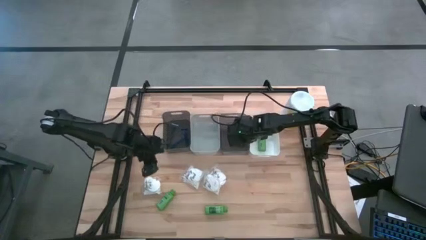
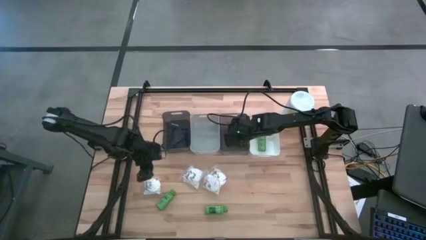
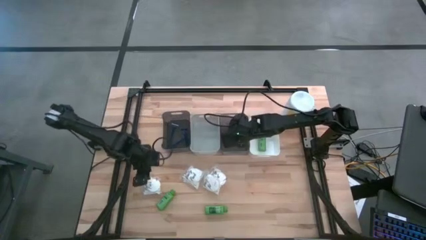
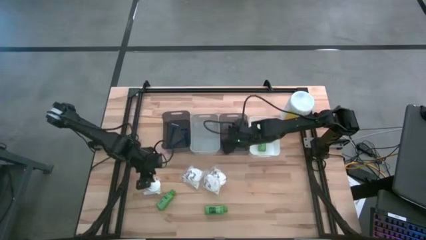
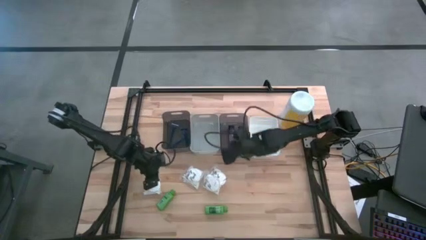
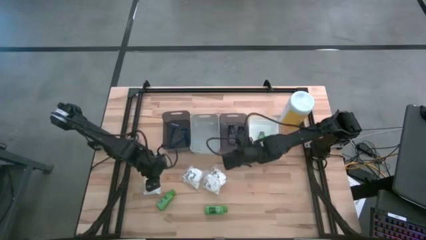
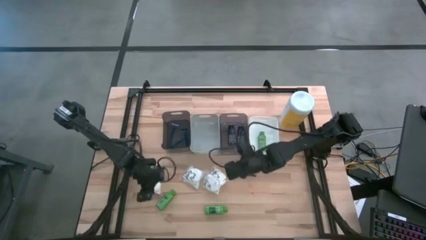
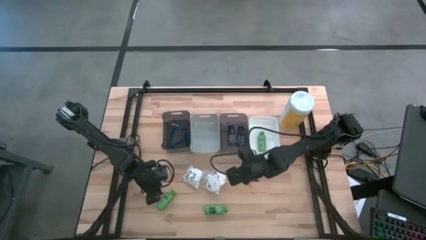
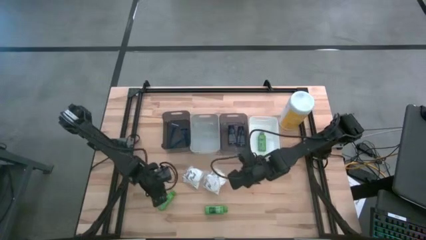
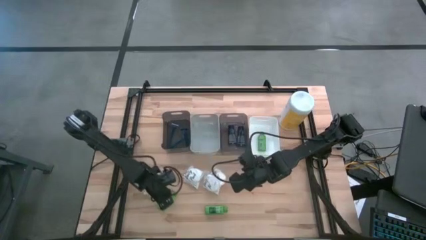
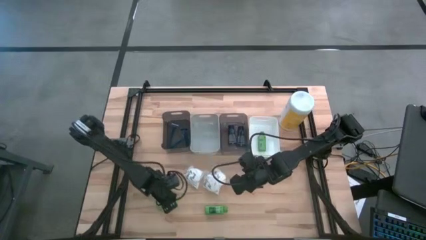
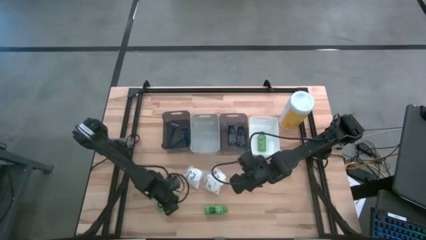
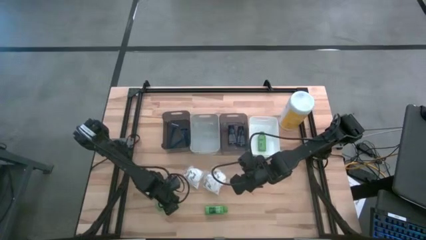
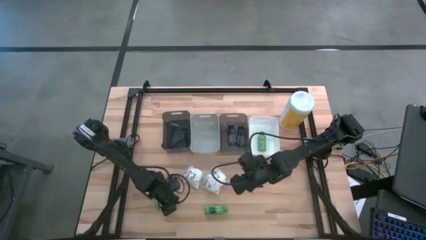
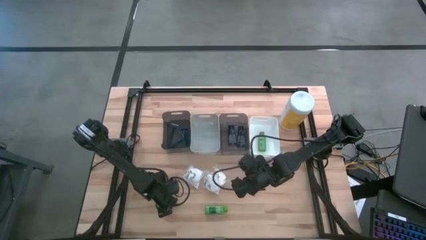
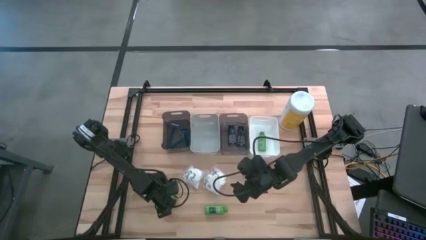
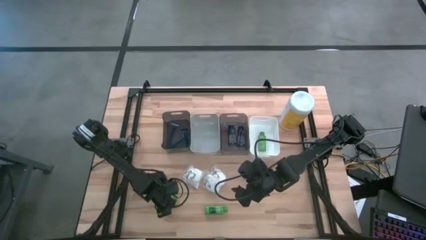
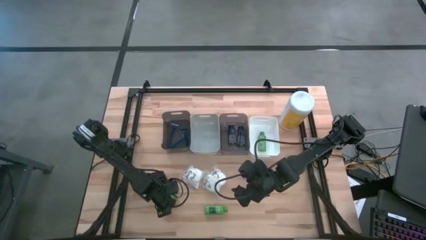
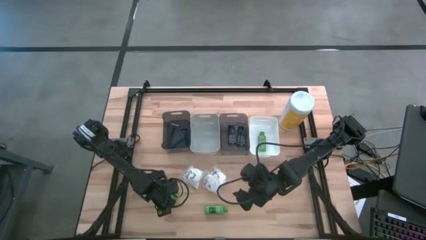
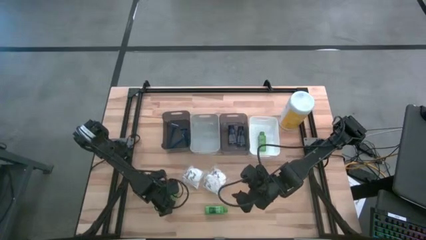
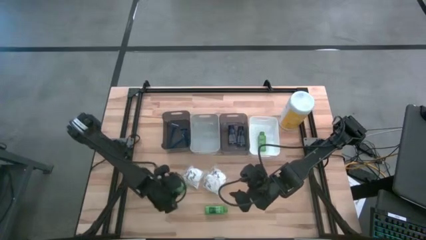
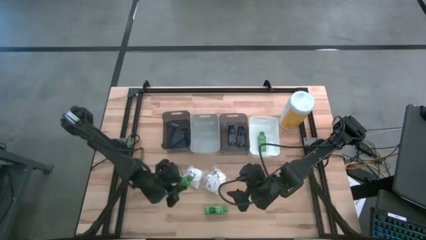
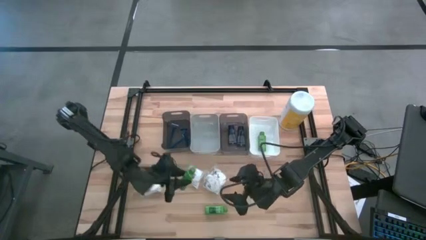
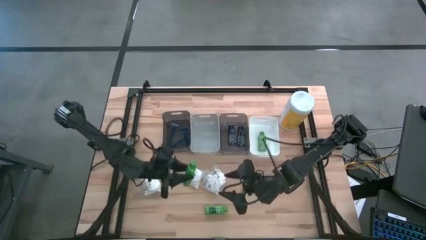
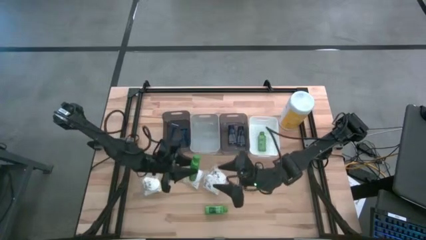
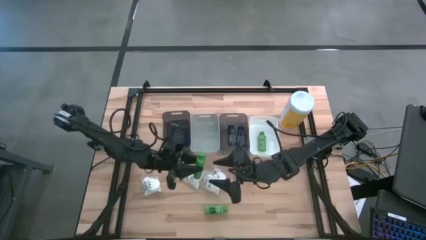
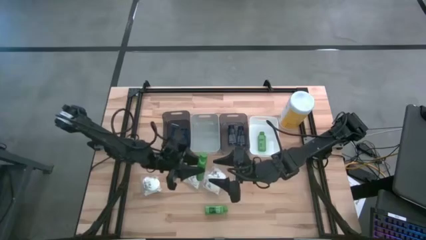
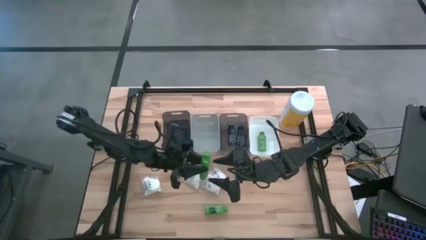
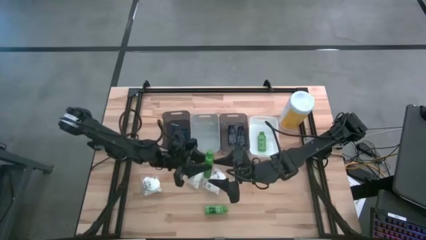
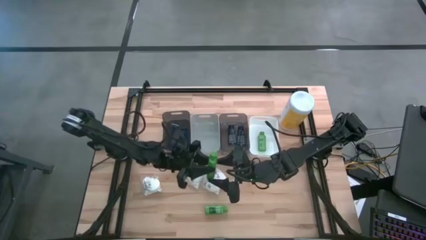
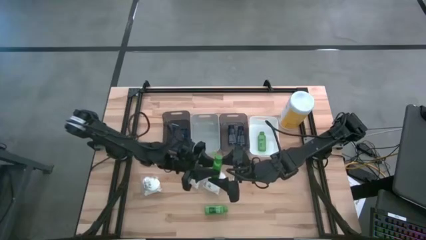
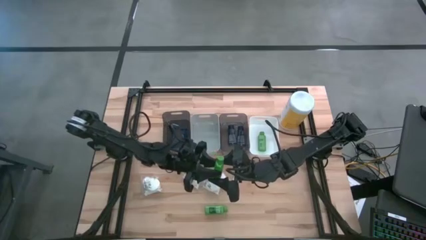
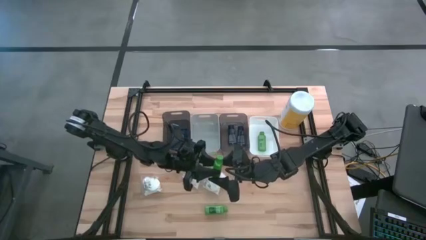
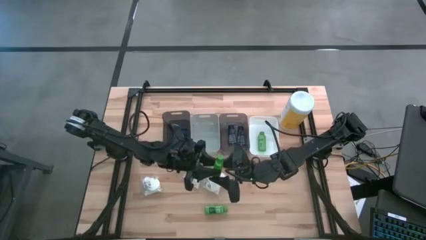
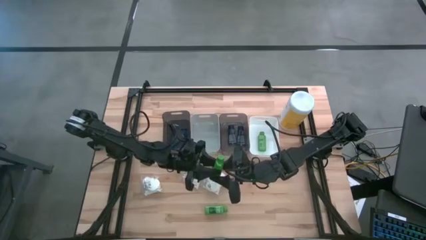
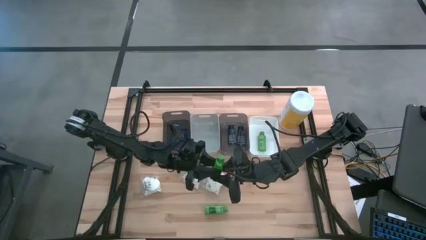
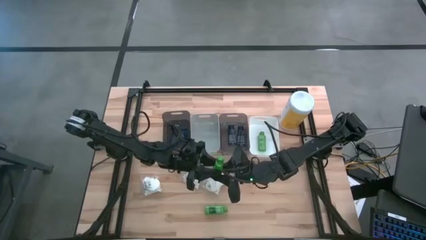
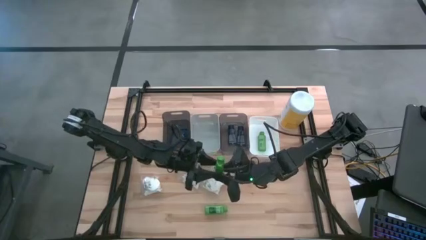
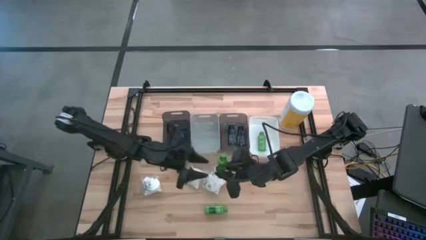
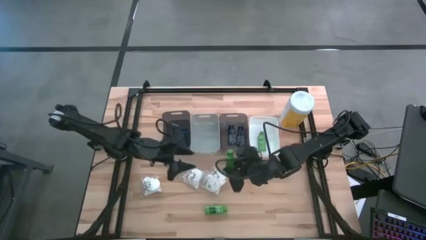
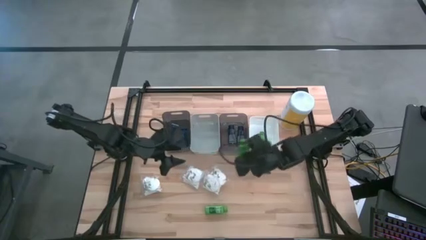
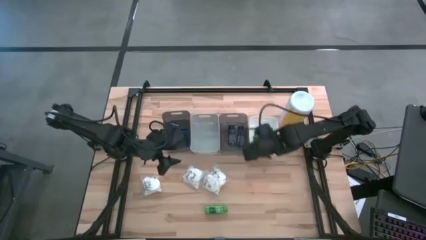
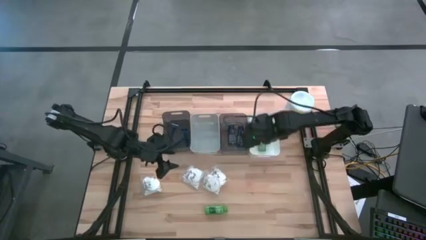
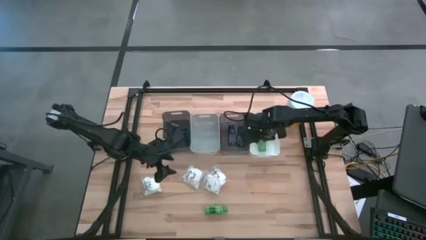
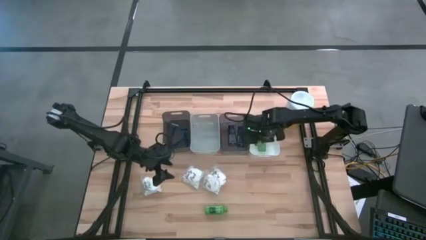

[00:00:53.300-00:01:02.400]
Task: Pick & Place Travel size toiletries
Put the green shampoo into the white bin

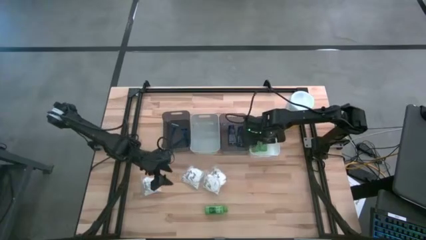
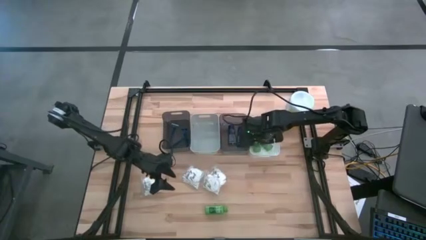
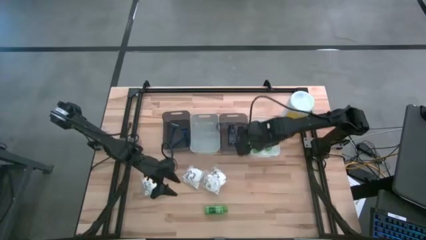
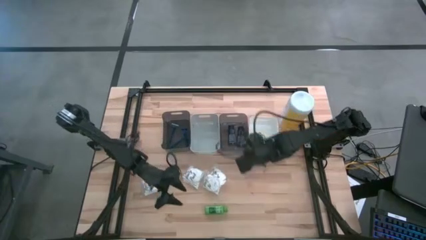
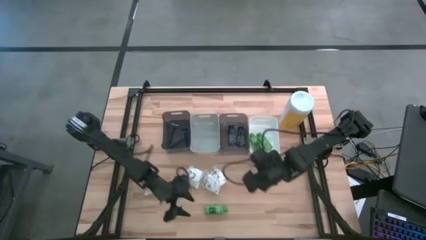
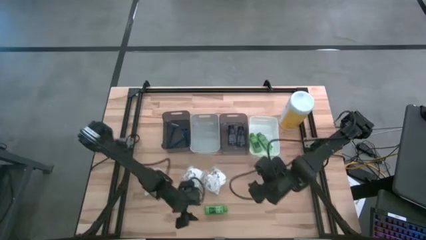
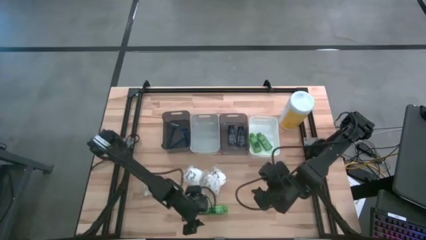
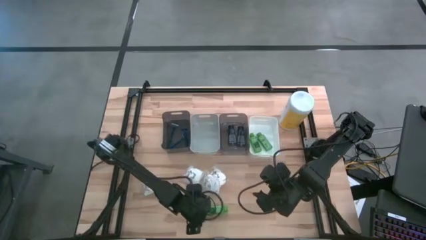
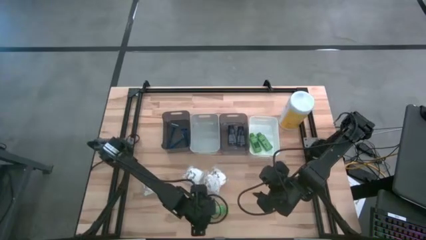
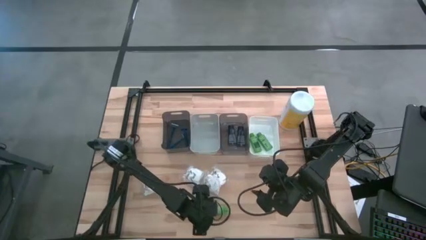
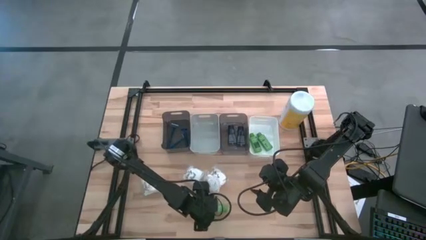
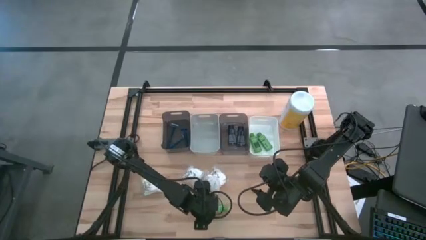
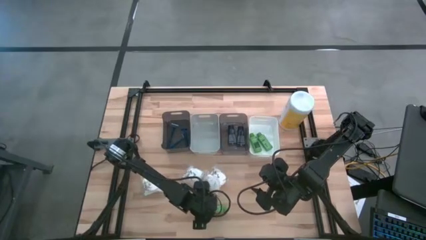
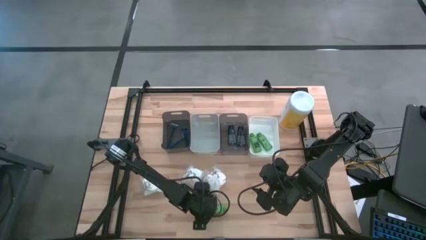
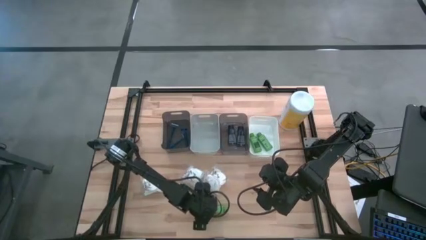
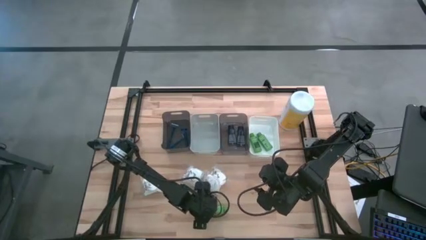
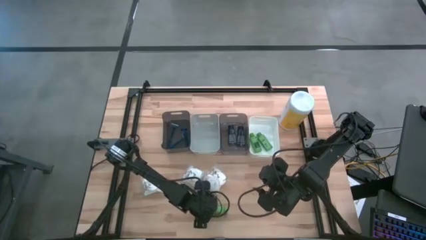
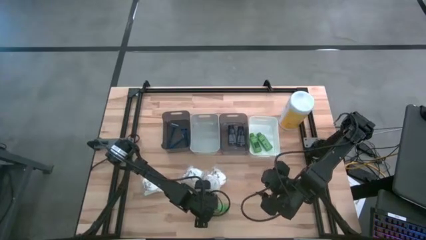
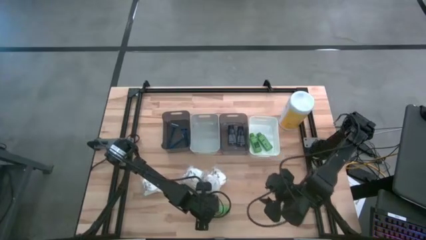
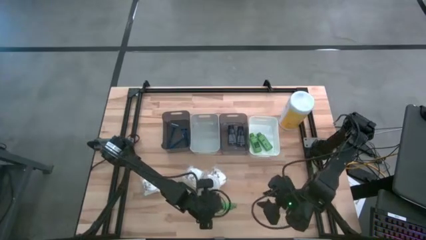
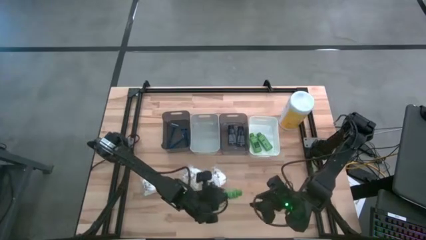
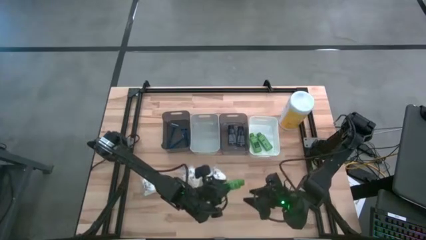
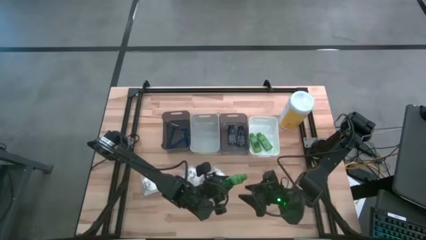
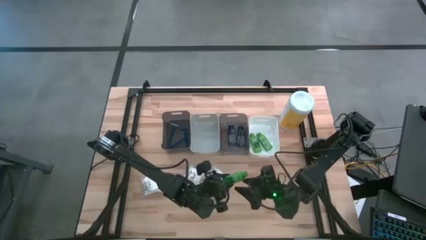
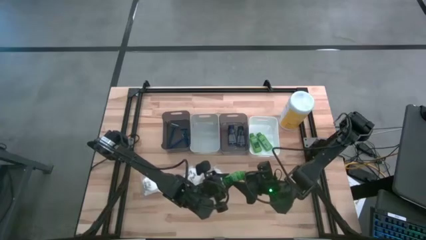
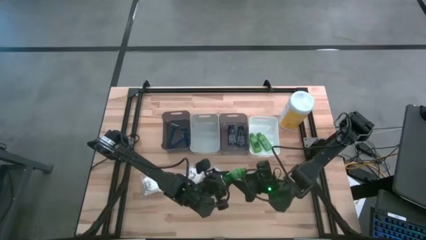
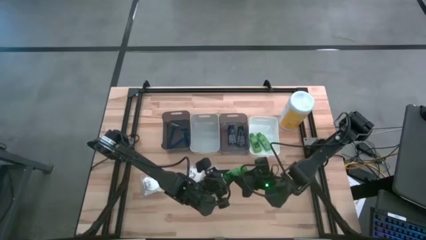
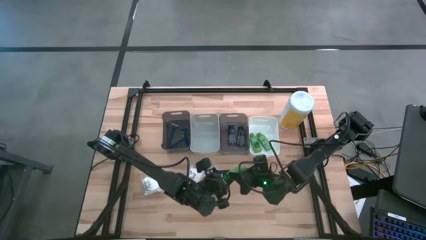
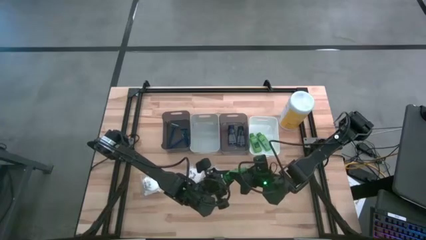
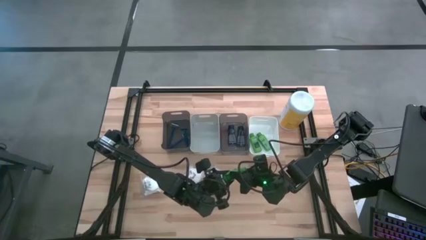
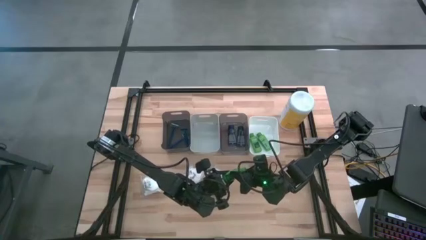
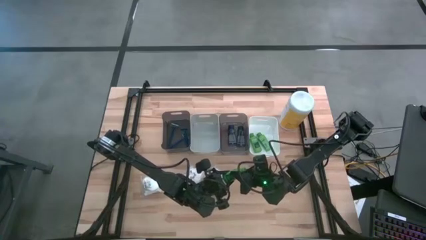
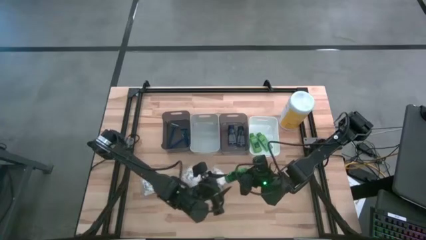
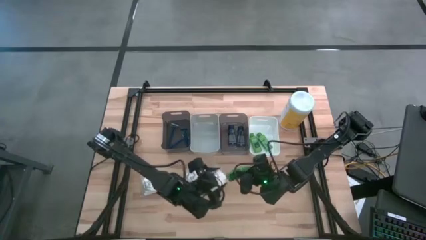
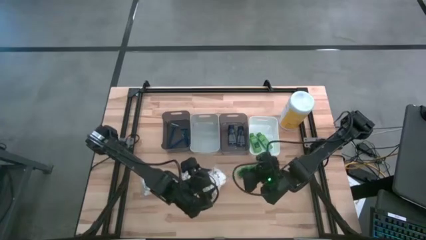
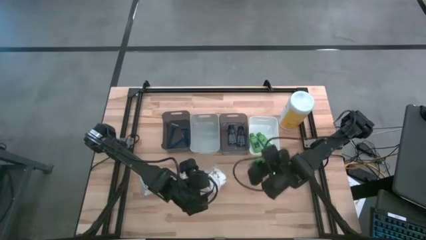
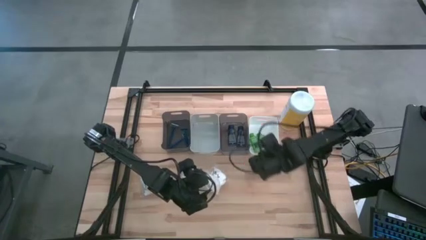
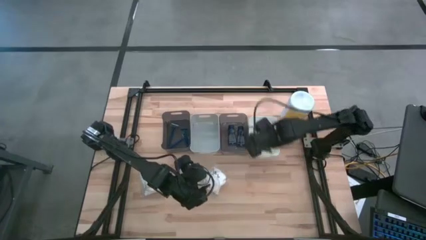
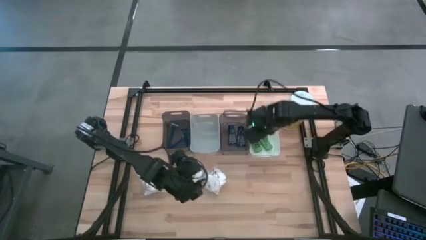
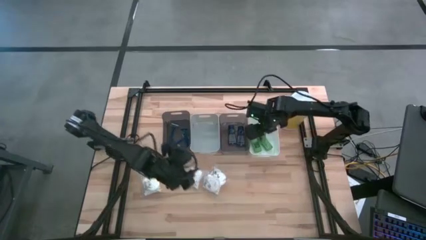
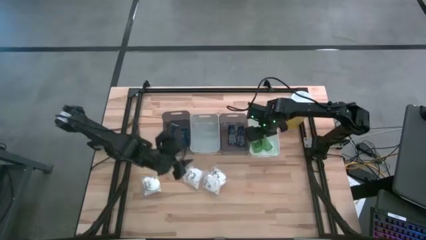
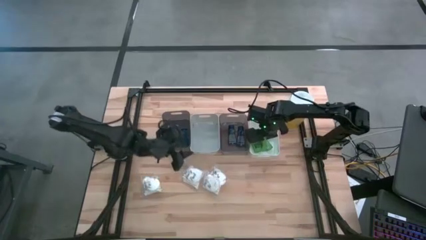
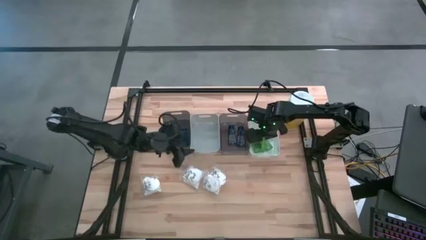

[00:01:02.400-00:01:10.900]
Put the green shampoo into the white bin
